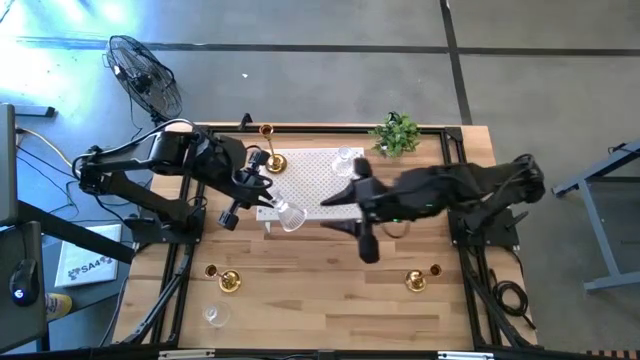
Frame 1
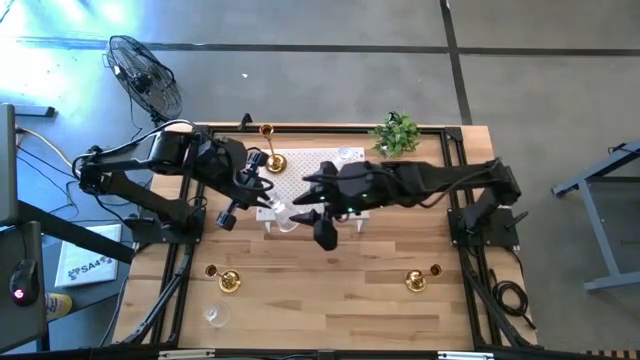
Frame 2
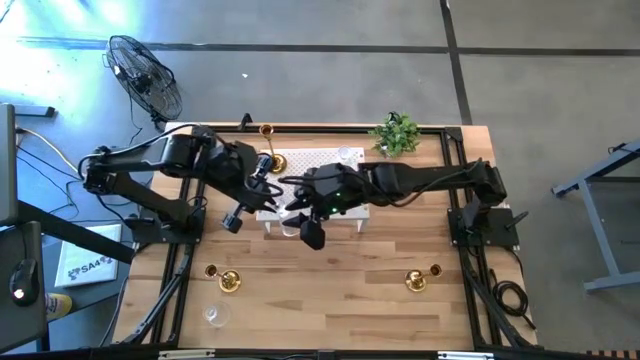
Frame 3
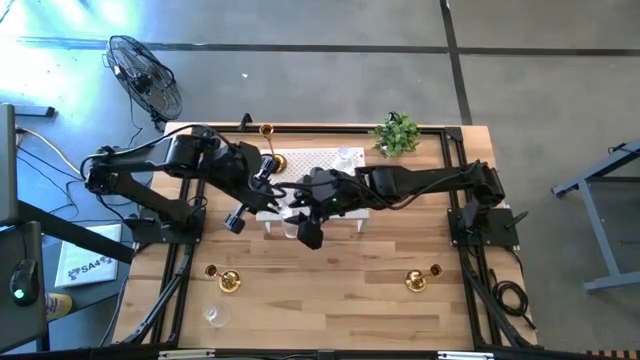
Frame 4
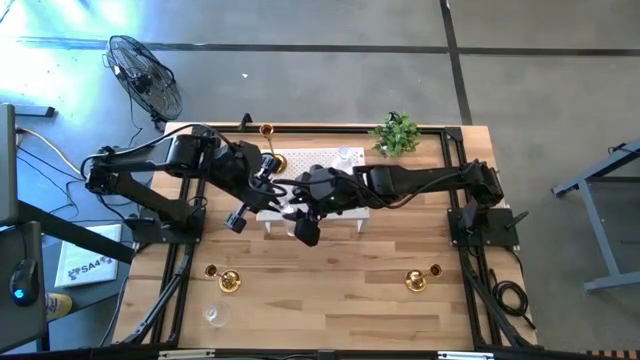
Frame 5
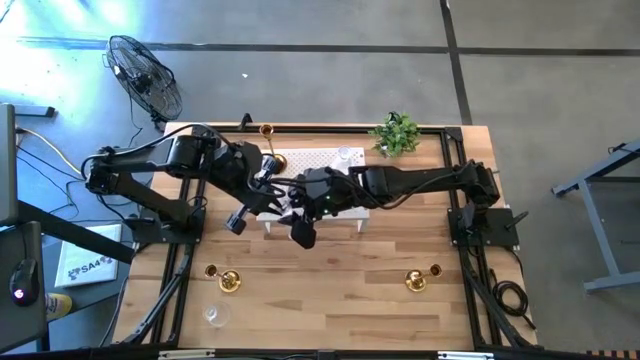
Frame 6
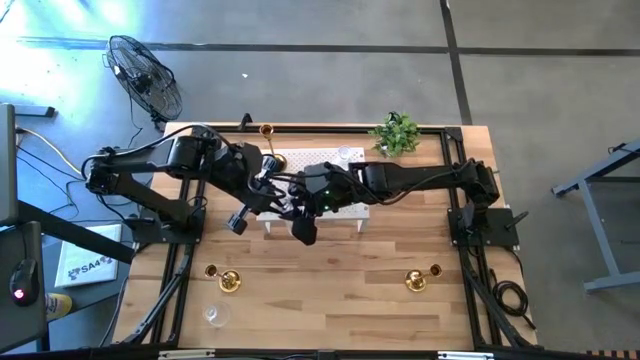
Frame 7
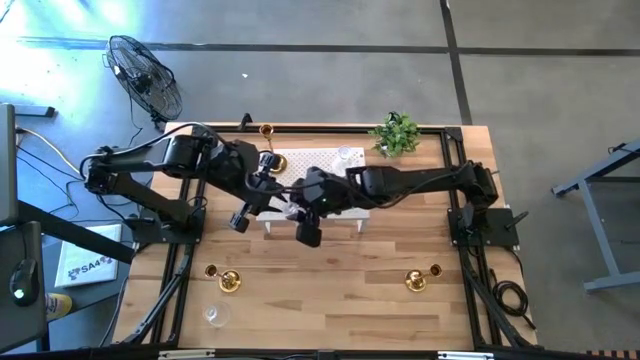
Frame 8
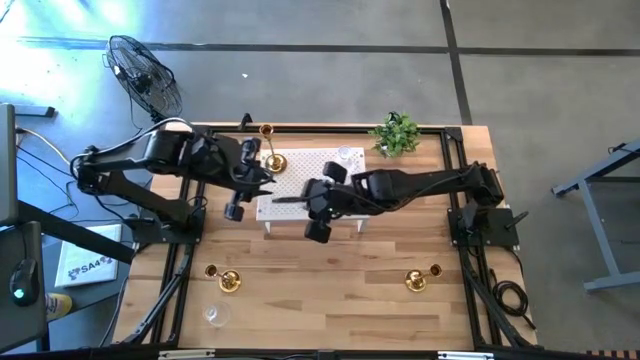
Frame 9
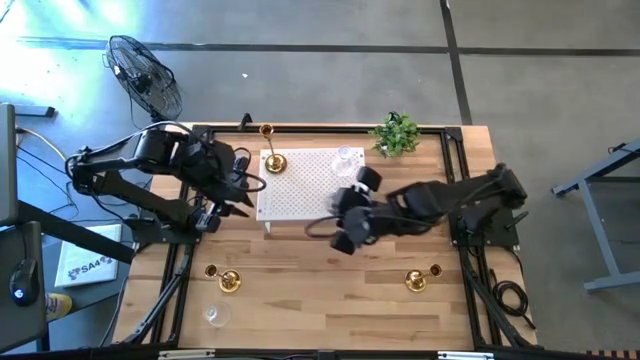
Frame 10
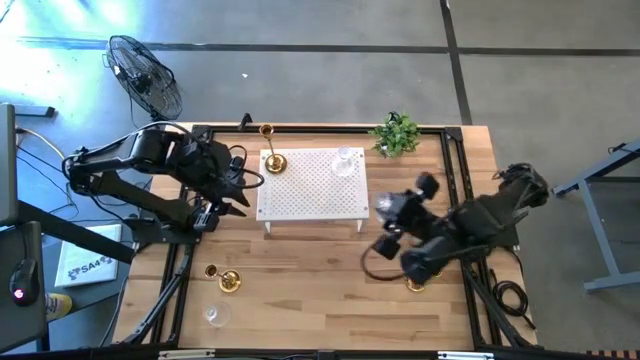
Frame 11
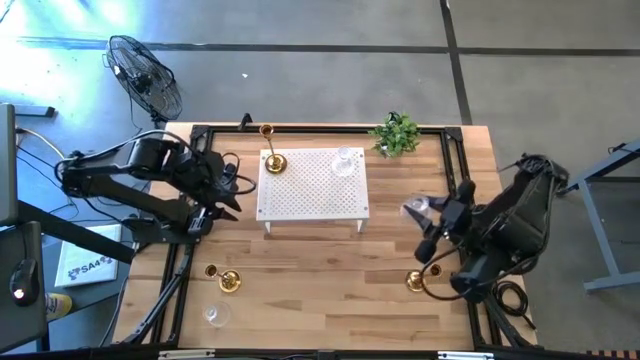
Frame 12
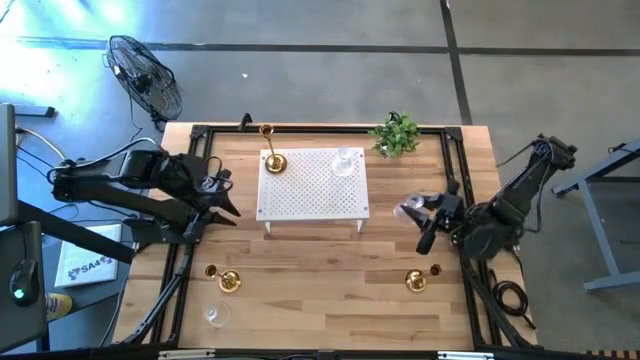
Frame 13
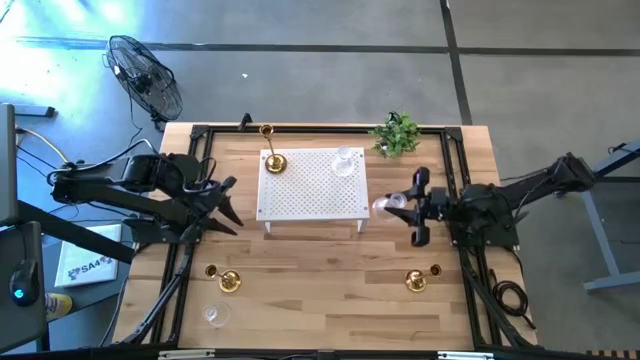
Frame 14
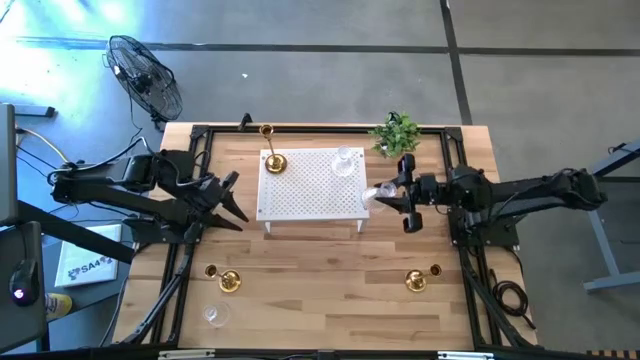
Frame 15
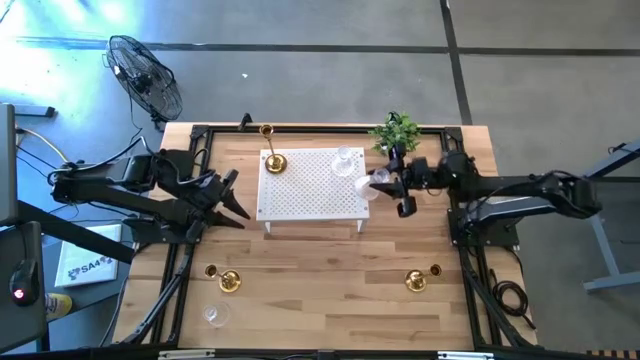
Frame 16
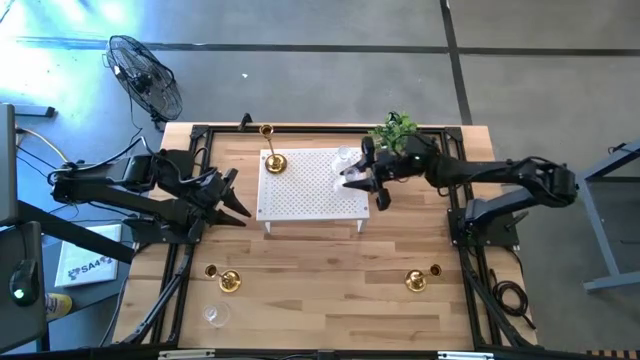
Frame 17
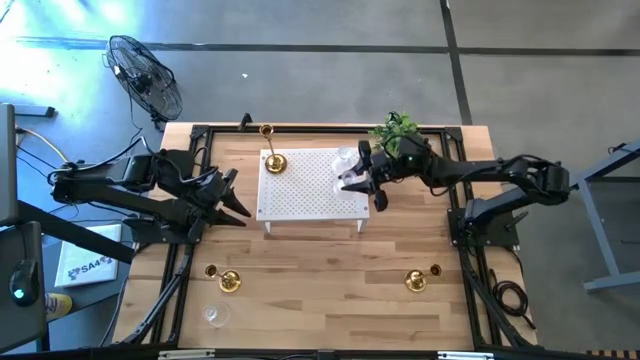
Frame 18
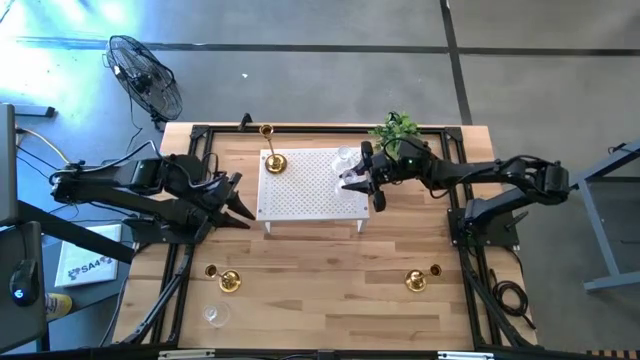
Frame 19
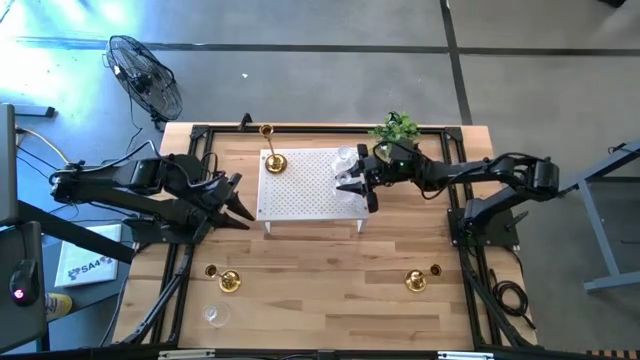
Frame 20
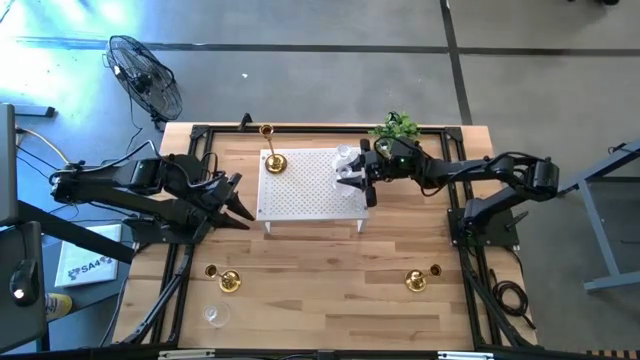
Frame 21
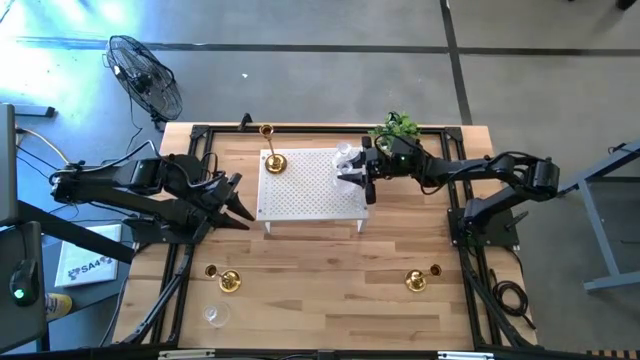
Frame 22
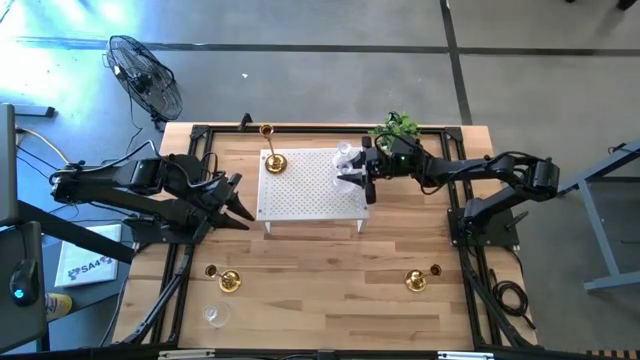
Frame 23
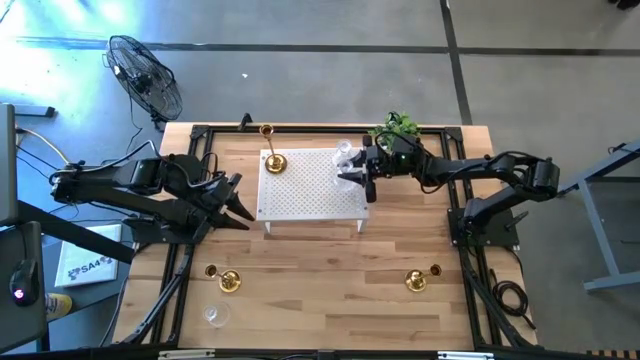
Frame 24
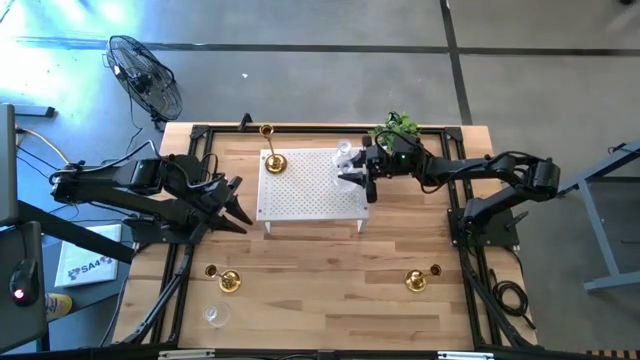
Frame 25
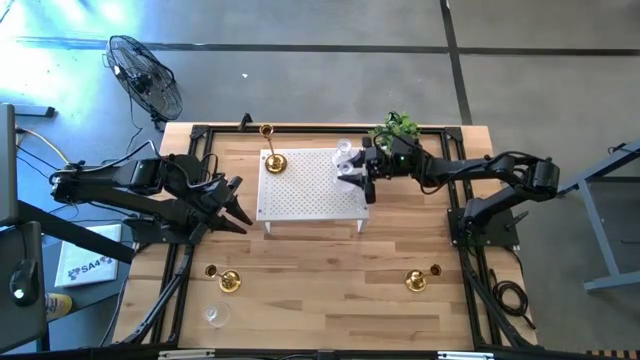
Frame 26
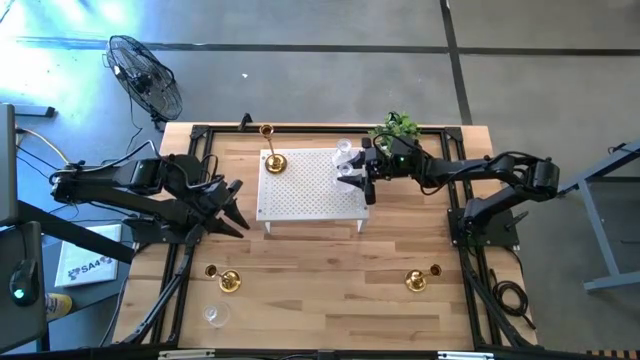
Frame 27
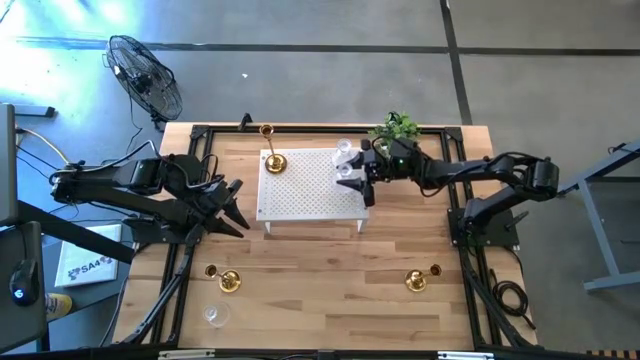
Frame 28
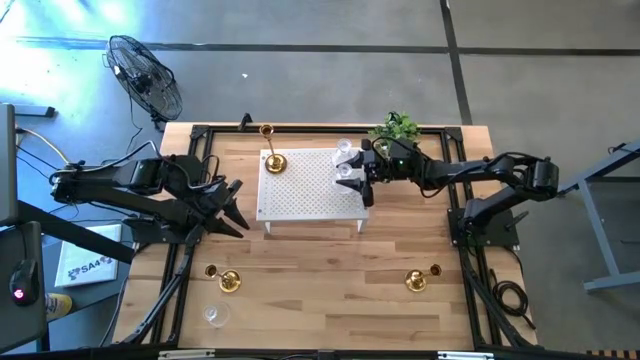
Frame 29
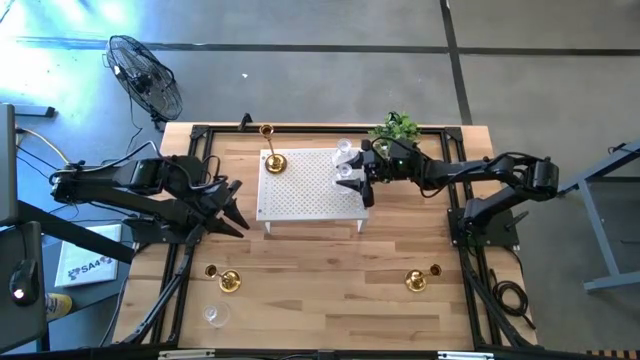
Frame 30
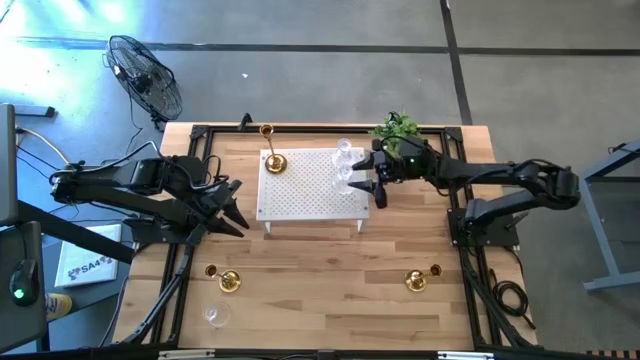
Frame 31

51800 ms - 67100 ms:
Task: Pick & Place candle stick holders
Put the top transparent glass candle holder on the shelf aligned with the other transparent glass candle holder
